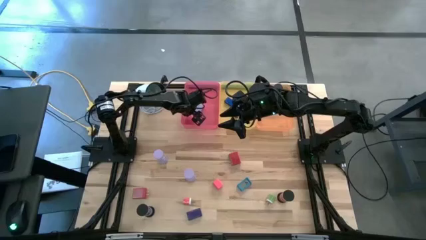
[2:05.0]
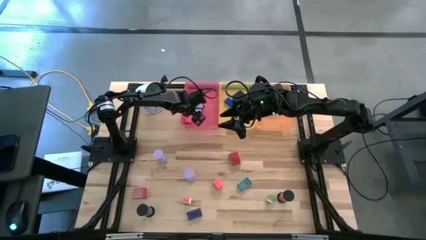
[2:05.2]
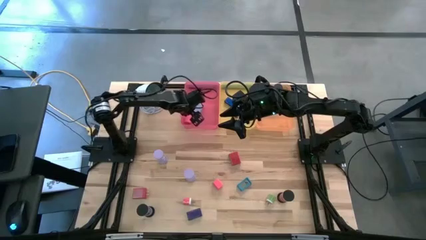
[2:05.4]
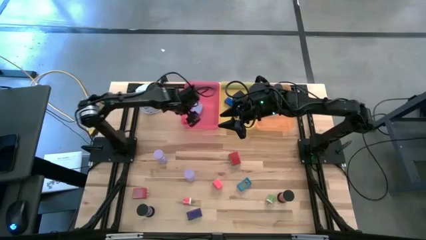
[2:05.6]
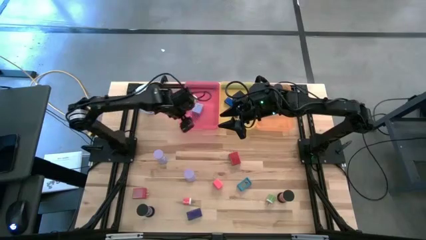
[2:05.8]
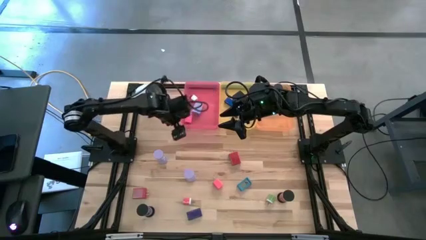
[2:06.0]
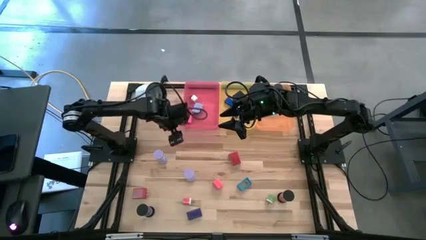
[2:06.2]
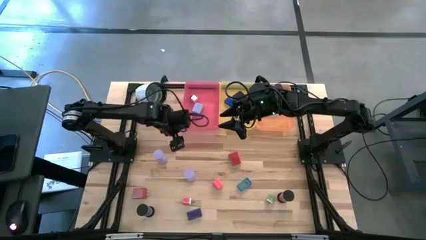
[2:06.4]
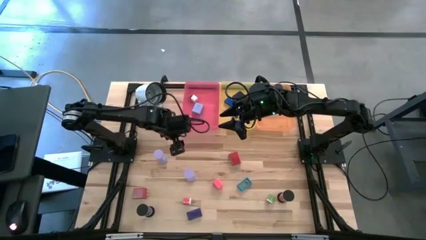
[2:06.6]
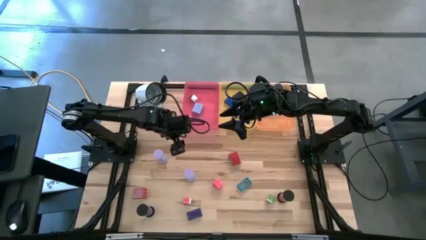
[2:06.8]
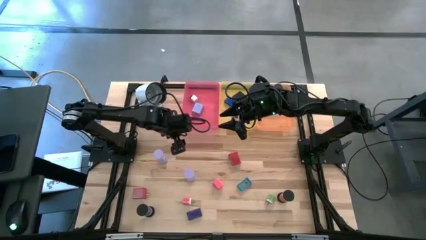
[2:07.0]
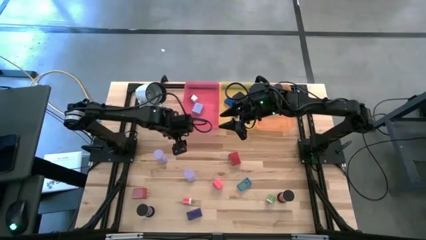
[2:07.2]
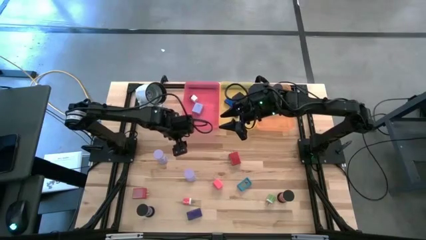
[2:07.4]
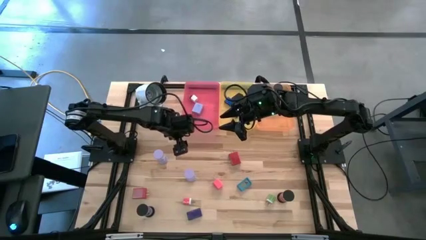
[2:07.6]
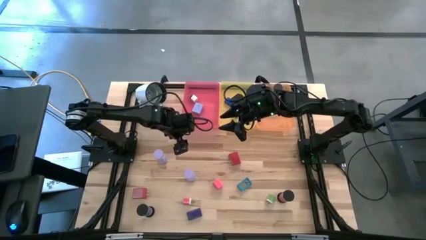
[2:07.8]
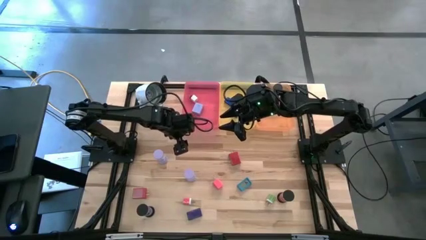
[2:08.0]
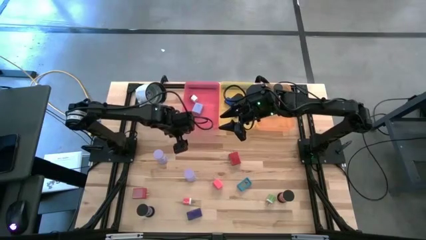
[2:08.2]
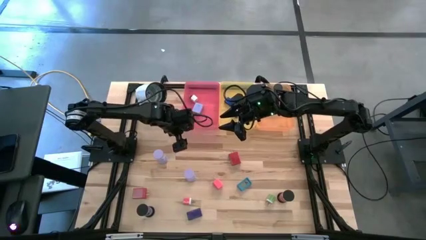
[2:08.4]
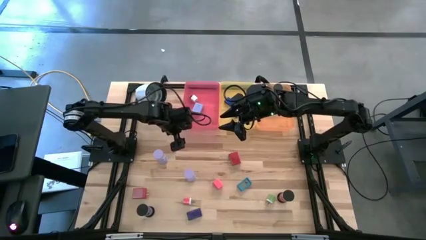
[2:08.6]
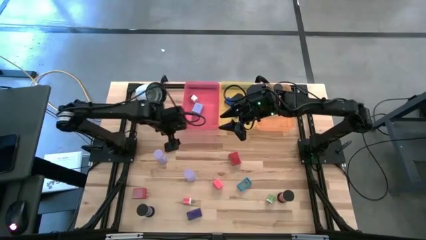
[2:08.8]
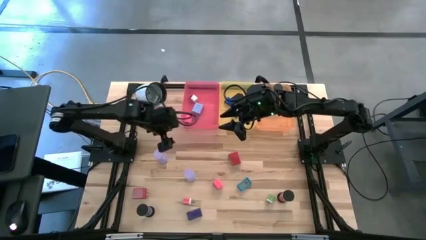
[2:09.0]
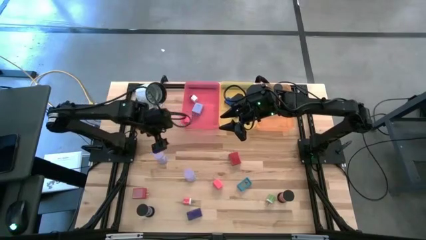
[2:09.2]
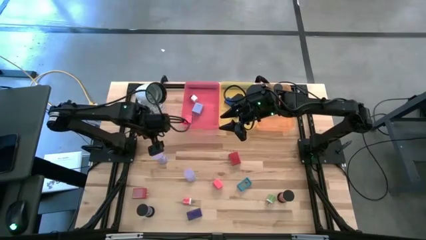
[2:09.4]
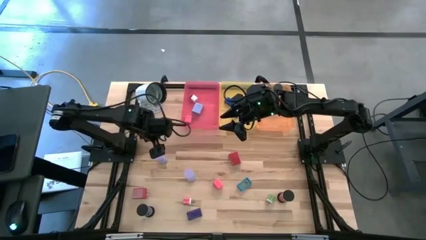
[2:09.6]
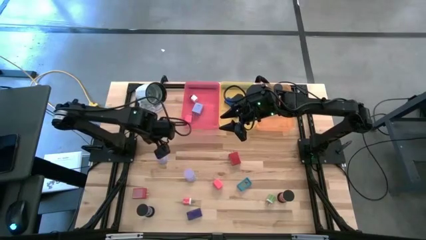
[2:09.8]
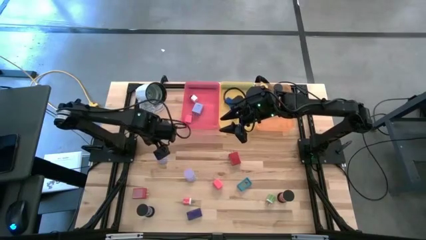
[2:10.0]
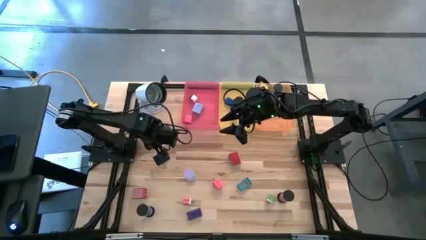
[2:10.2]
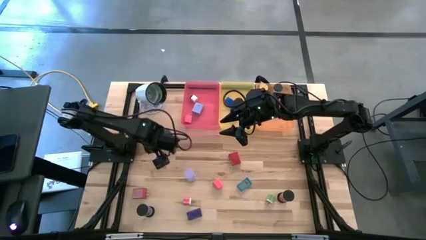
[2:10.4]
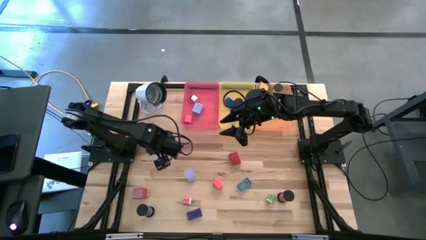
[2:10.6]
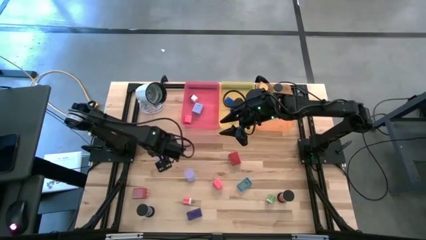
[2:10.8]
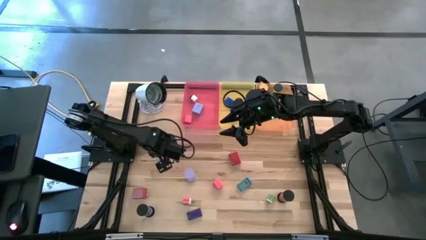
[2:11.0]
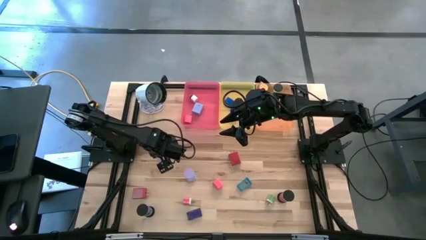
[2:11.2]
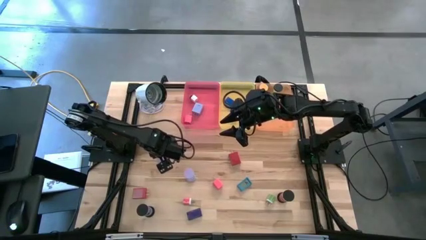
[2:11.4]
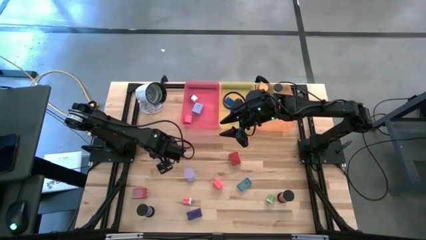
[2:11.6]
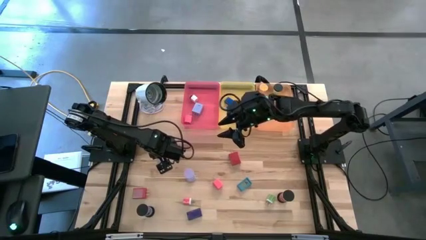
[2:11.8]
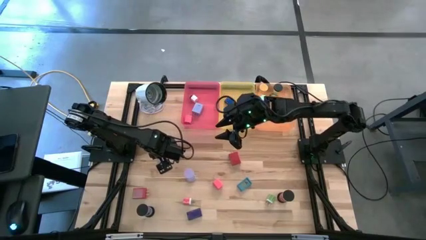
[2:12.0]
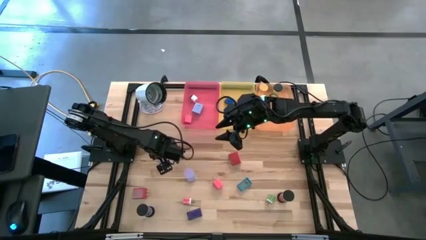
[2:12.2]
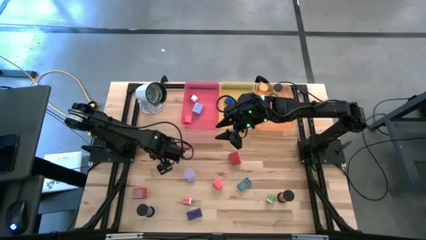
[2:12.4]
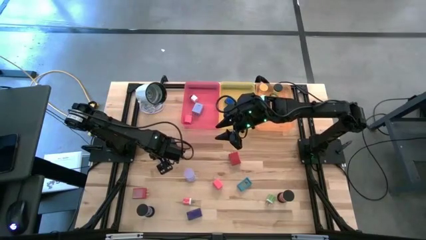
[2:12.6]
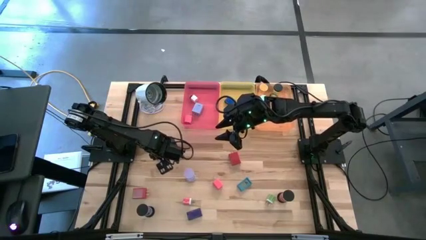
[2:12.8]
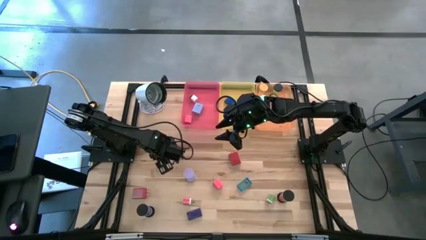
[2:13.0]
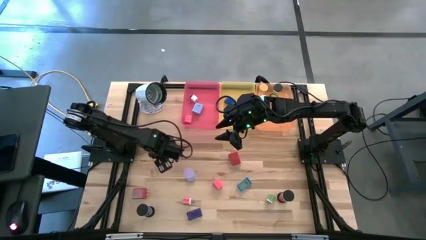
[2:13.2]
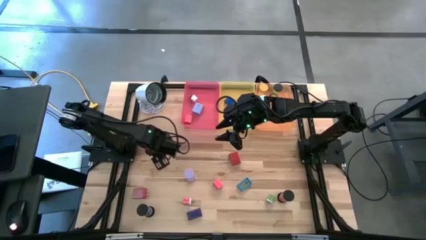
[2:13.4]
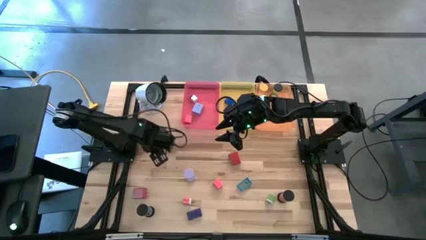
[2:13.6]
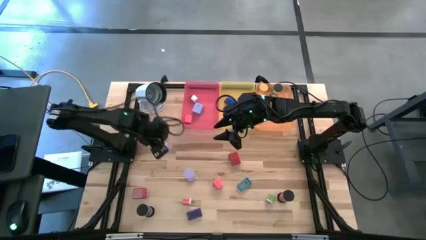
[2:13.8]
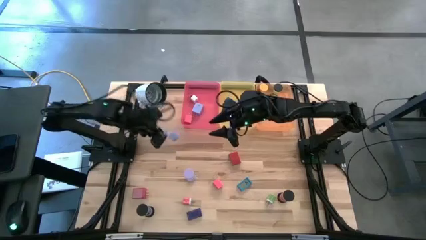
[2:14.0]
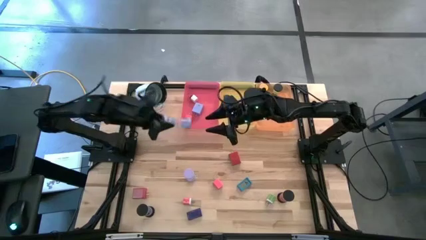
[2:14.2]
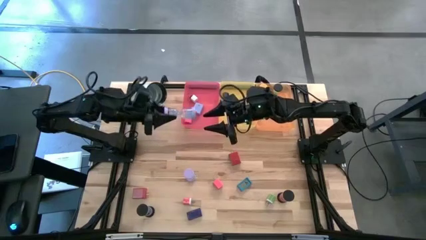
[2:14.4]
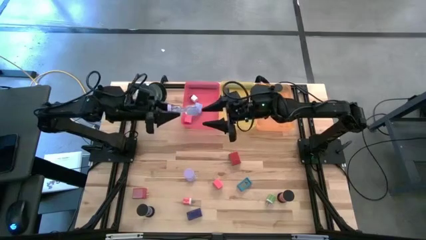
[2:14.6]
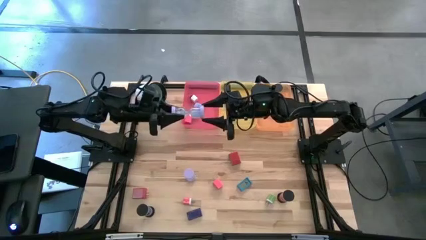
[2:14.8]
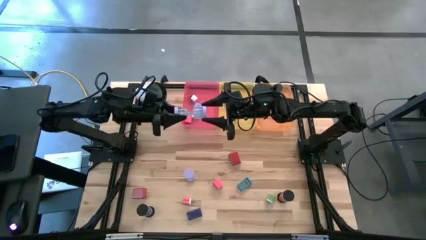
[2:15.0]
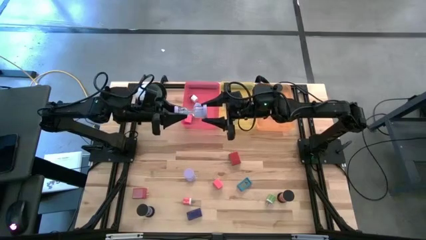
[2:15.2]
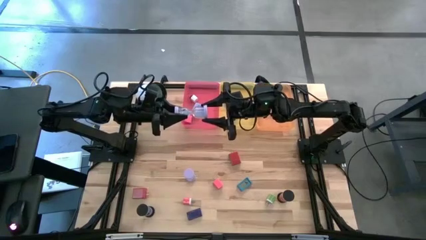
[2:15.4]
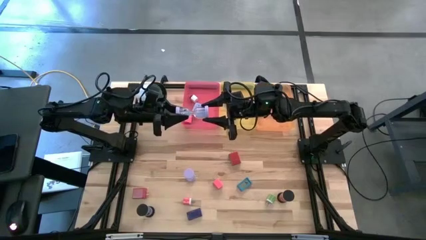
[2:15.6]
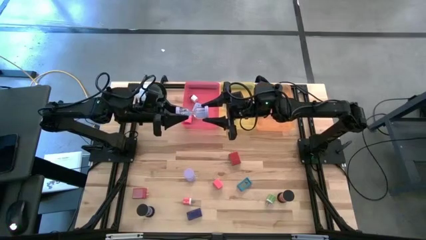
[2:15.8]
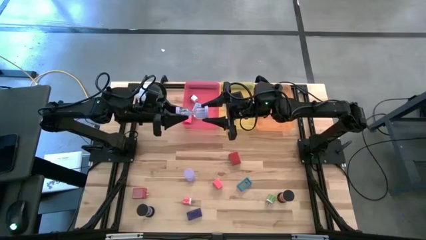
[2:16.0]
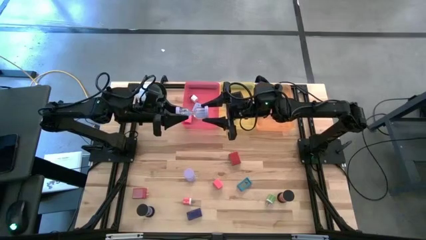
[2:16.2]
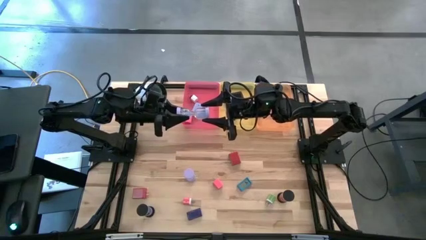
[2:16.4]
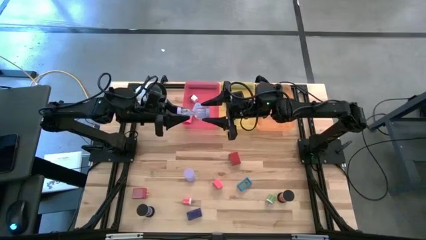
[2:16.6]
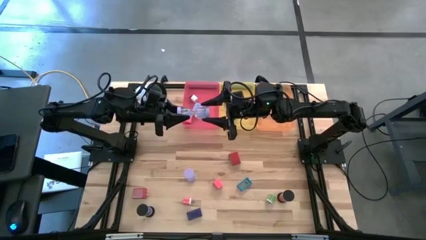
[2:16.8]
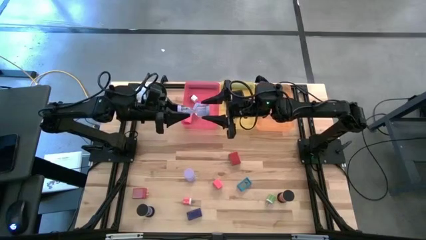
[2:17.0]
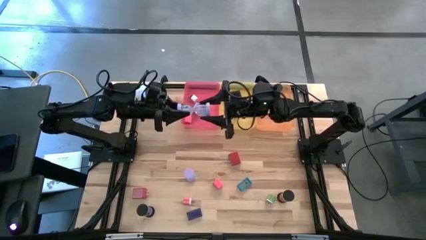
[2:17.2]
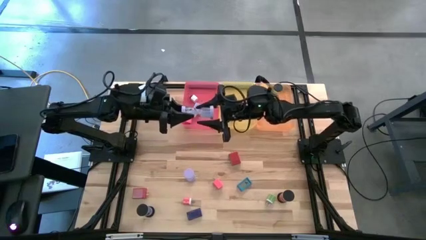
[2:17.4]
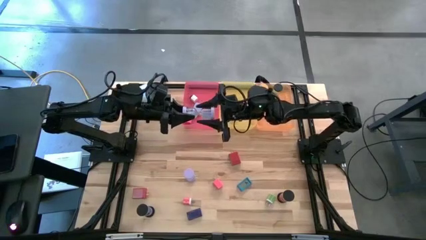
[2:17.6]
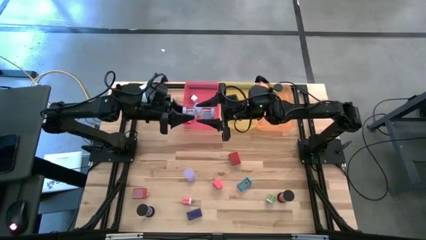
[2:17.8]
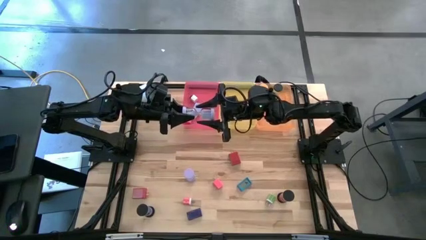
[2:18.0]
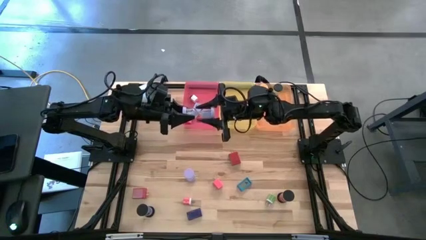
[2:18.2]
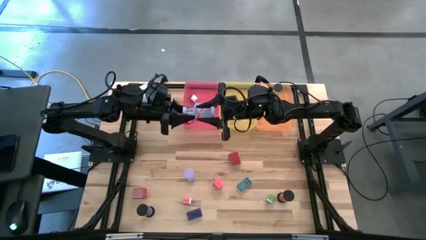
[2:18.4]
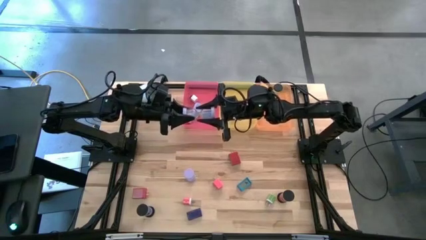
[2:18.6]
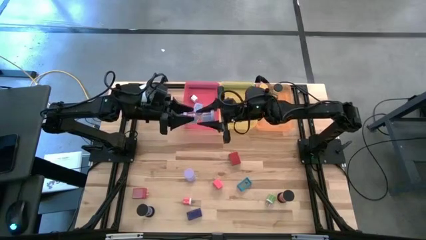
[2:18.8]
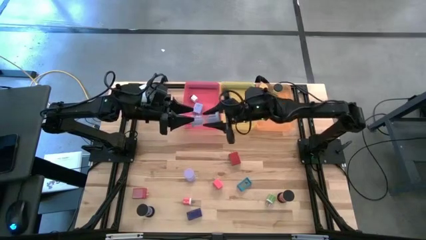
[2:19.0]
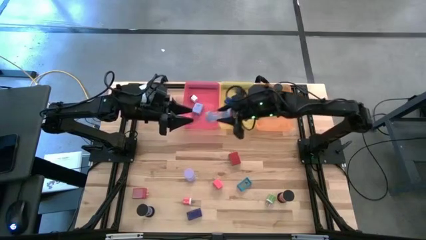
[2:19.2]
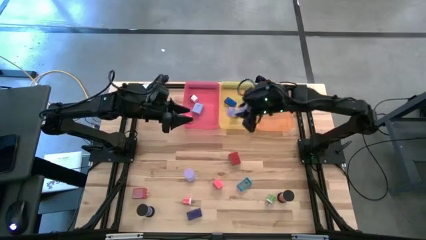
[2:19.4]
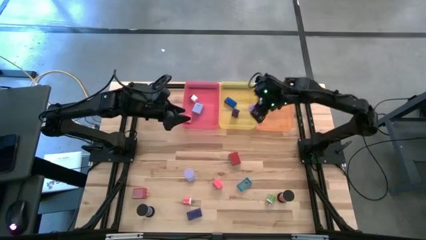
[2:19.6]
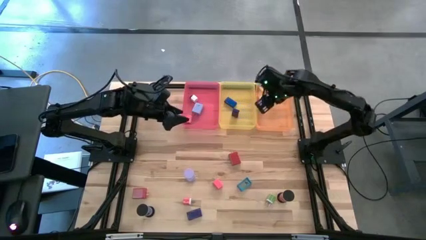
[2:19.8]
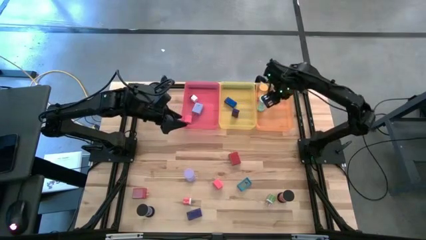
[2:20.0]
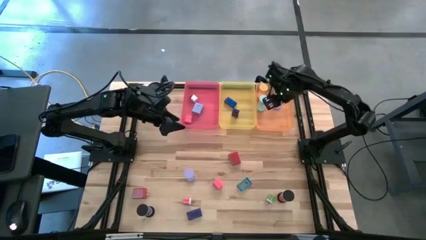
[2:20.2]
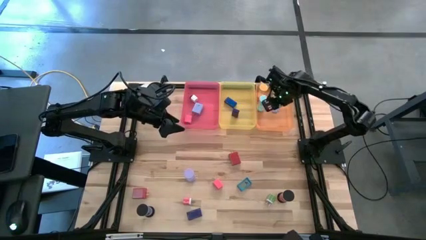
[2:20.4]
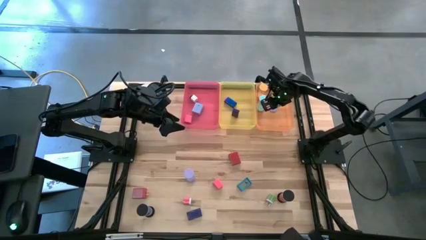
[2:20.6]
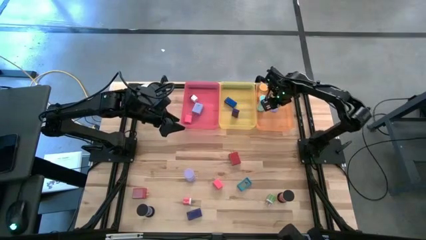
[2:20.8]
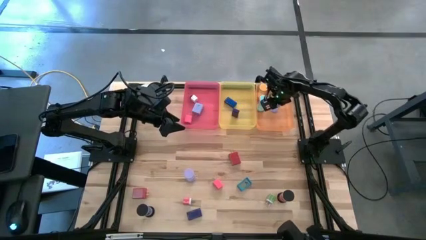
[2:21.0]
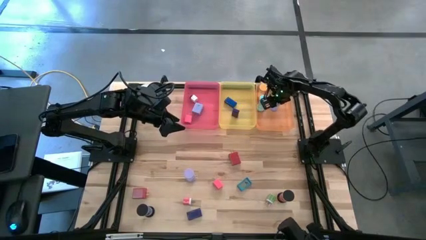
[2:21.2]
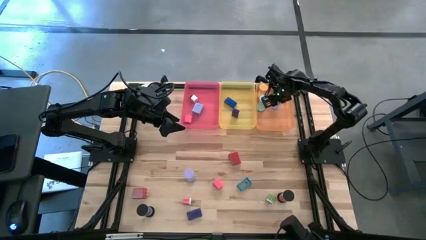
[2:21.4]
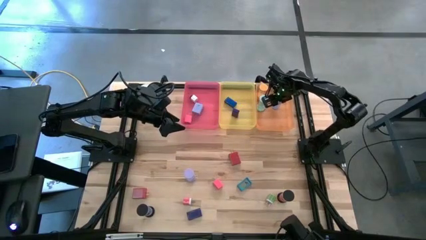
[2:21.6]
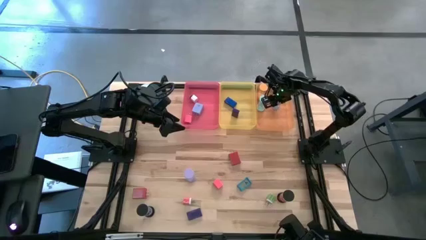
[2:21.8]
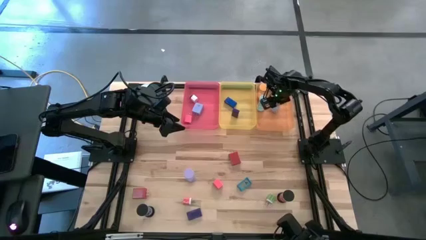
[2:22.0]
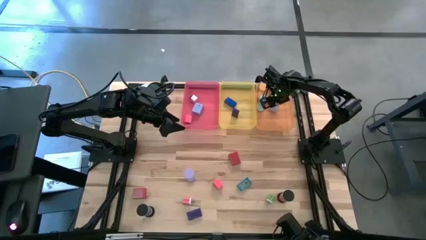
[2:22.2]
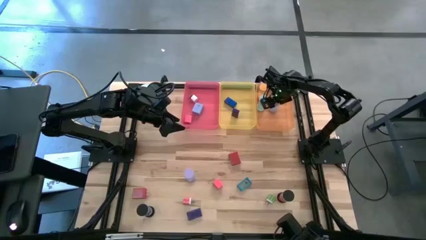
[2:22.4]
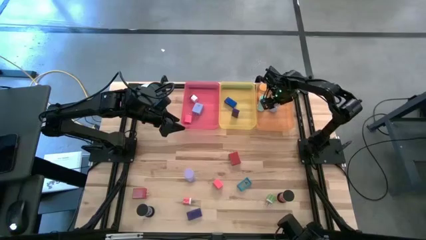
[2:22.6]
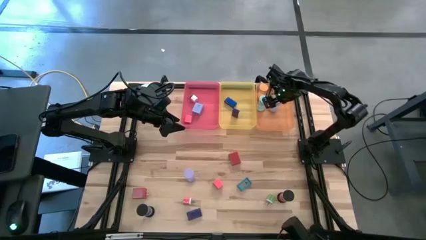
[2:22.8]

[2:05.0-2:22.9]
Task: Pick & Place Office items
Put the top violet hourglass into the orange bin
